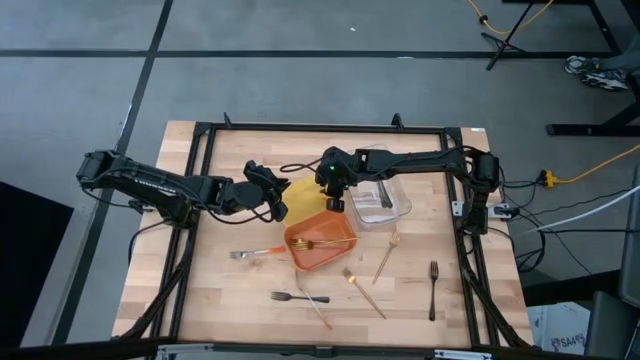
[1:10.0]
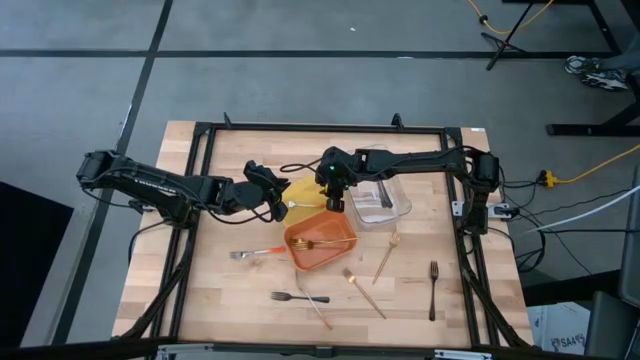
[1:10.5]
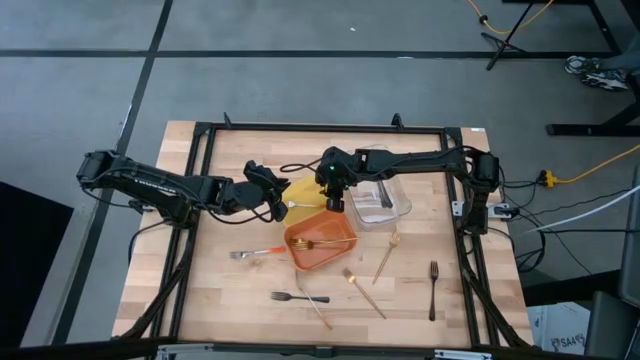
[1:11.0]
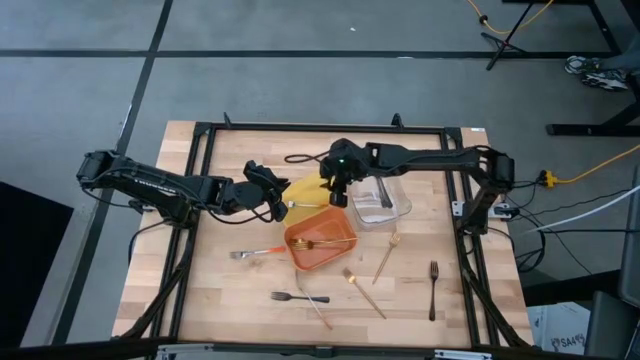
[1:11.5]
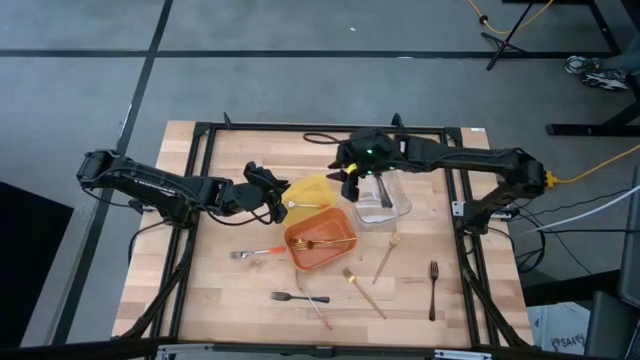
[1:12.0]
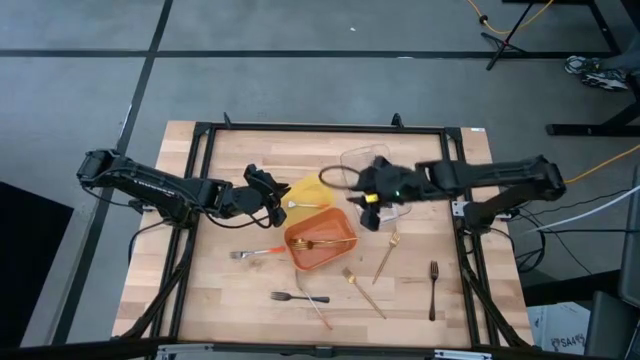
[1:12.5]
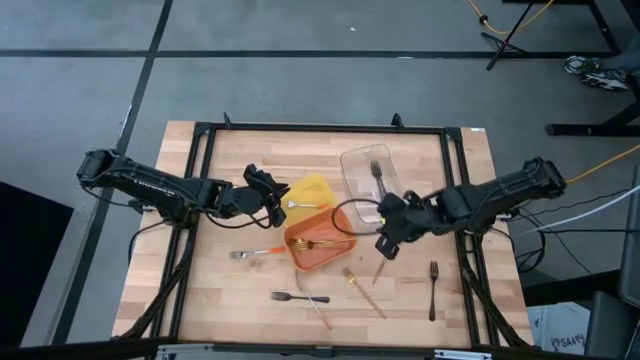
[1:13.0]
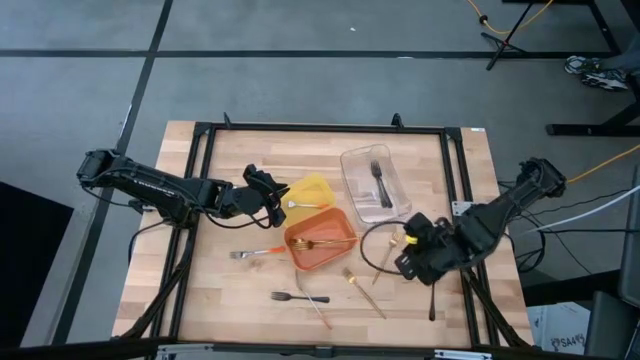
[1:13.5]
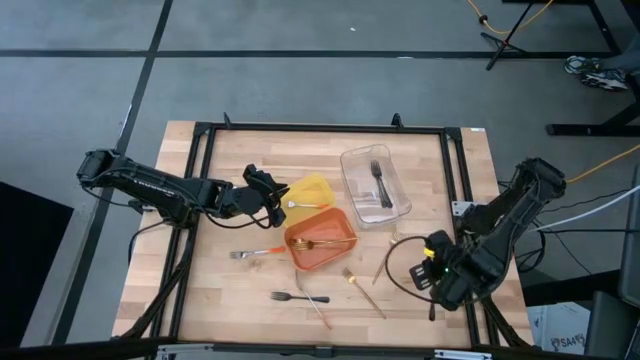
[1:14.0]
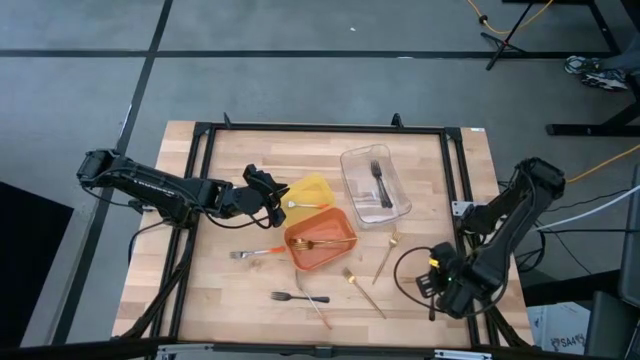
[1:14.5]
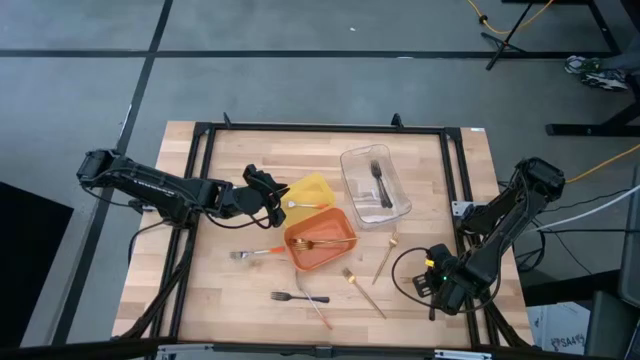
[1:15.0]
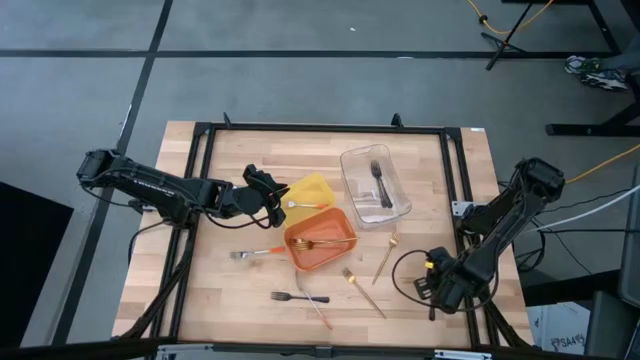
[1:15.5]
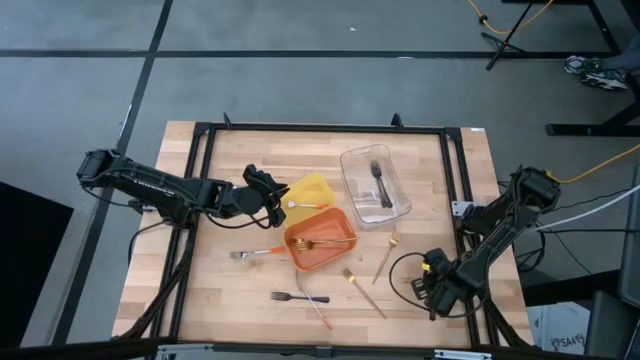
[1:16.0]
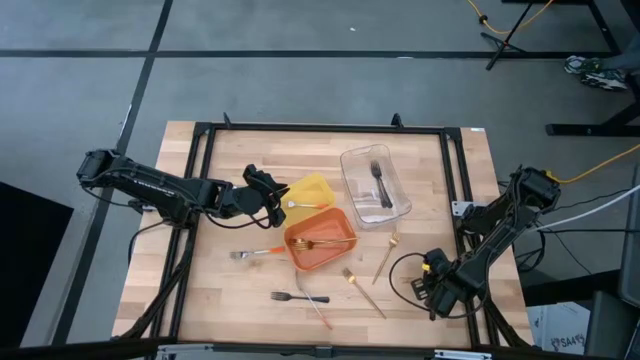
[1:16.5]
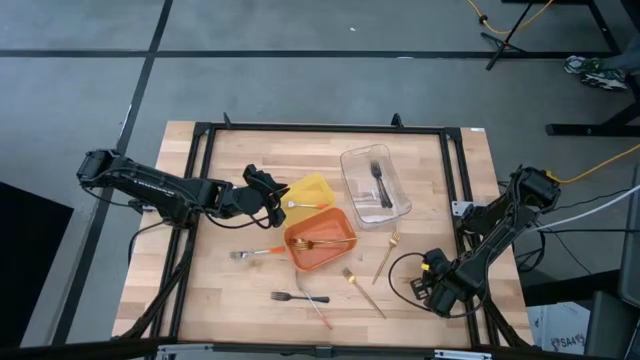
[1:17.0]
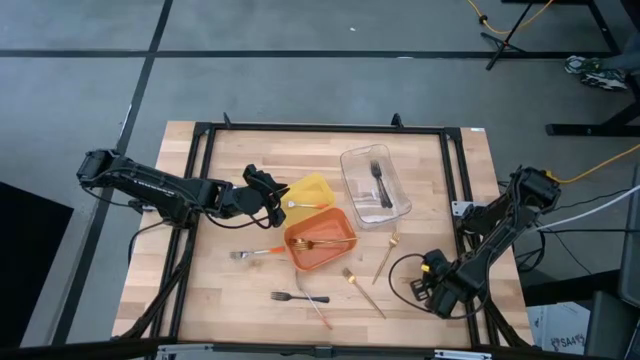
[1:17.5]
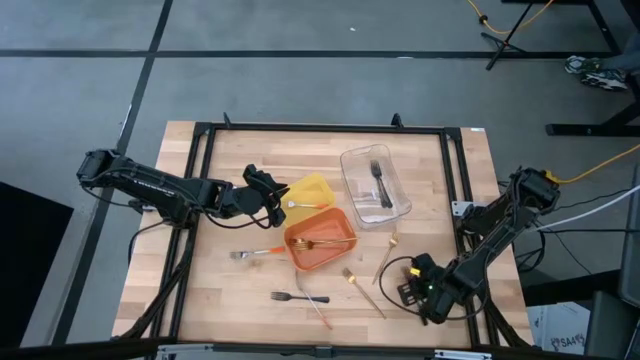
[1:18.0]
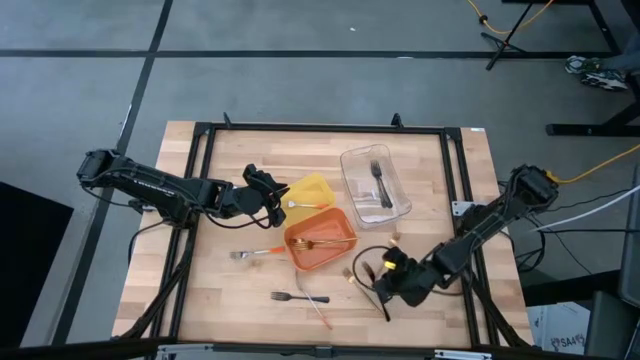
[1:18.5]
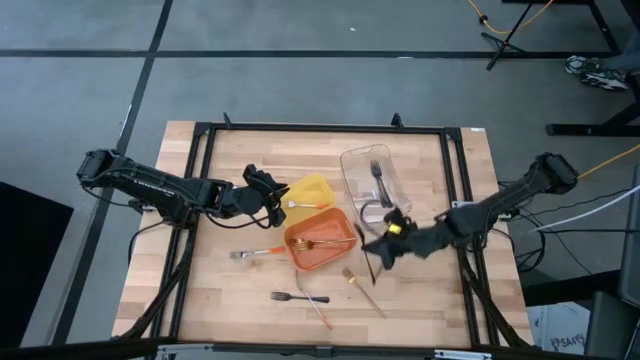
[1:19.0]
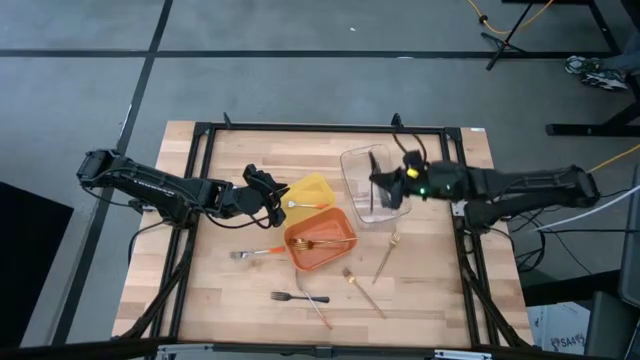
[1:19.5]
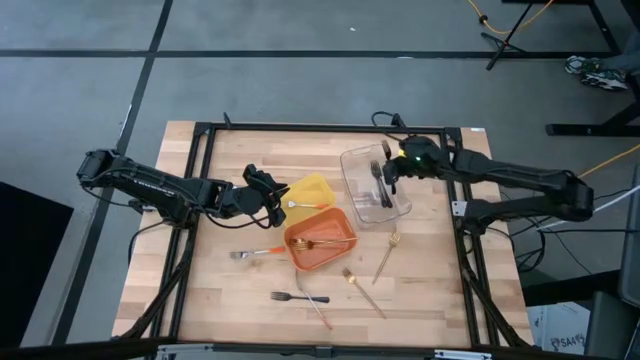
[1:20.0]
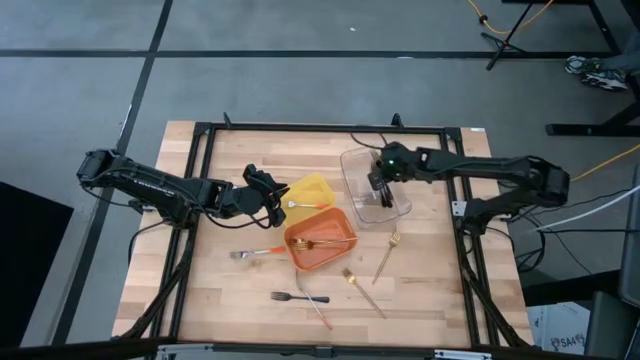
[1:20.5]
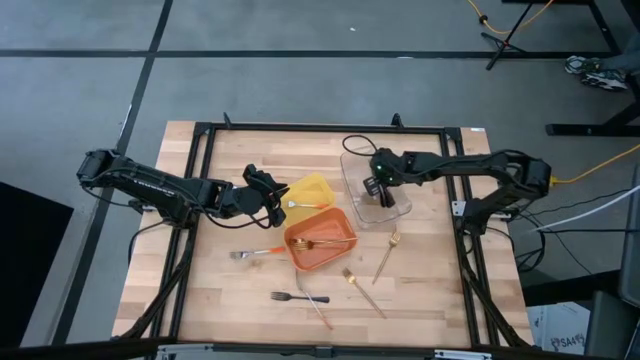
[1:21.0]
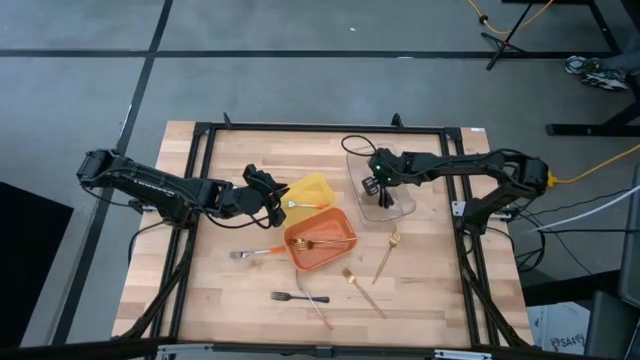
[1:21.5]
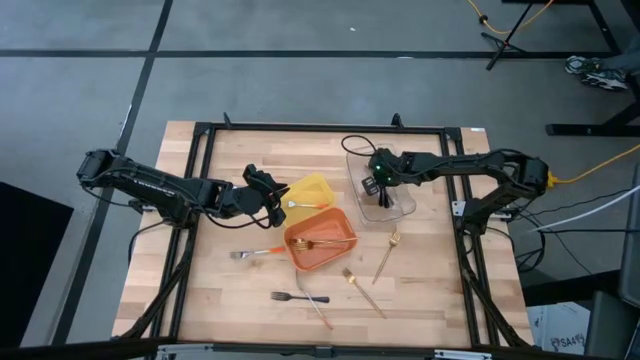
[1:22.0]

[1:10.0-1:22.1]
Task: Sort silverware by color (type)
Put the black fork into the transparent bin

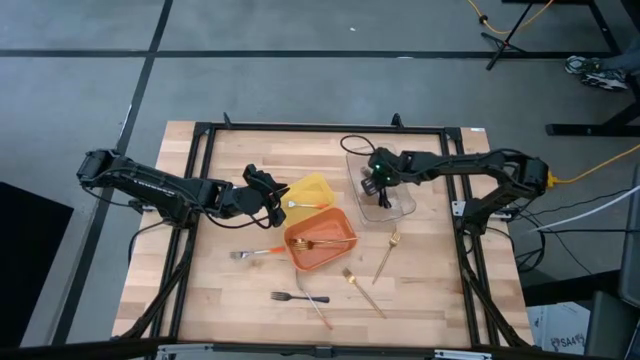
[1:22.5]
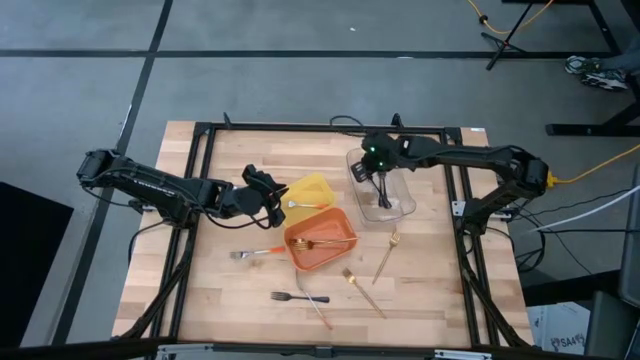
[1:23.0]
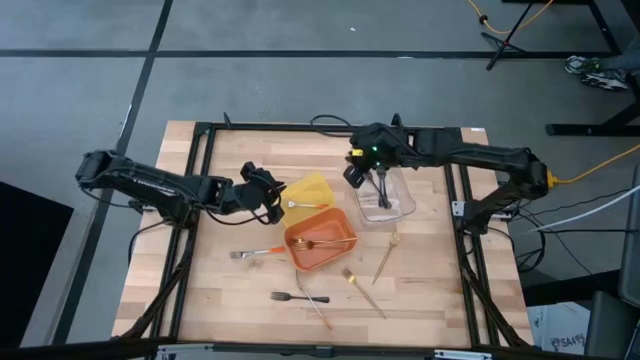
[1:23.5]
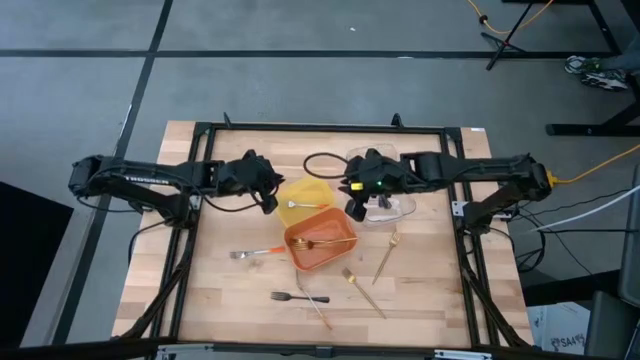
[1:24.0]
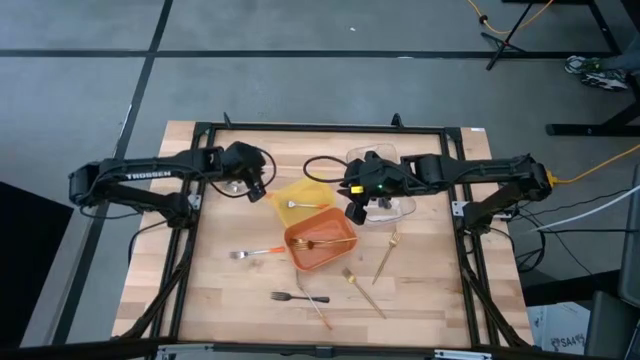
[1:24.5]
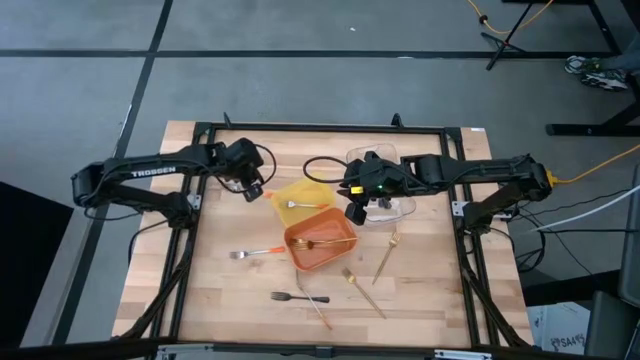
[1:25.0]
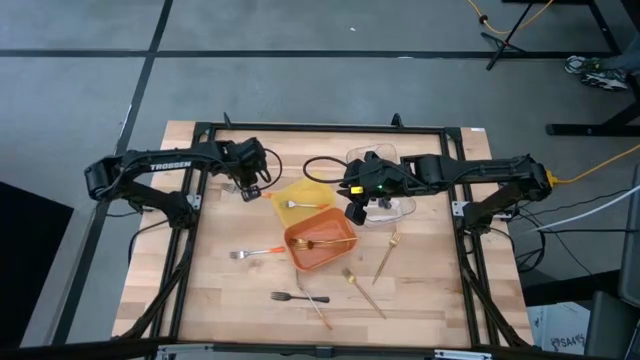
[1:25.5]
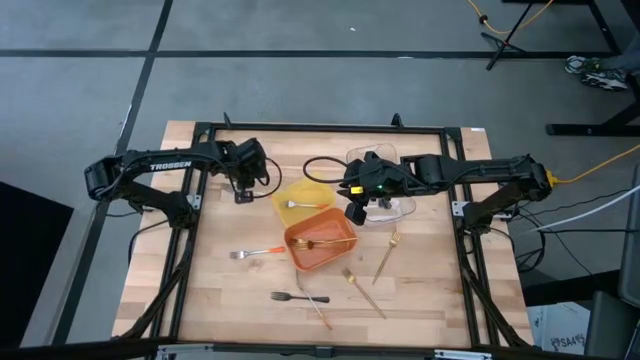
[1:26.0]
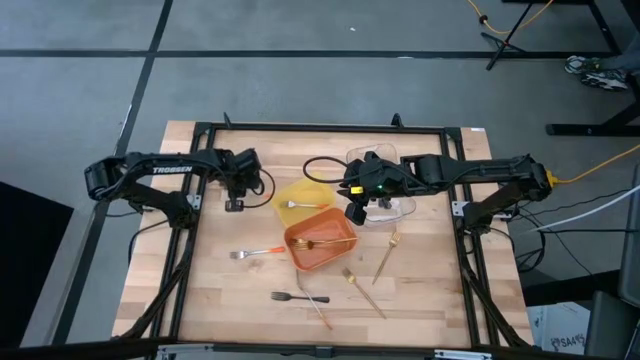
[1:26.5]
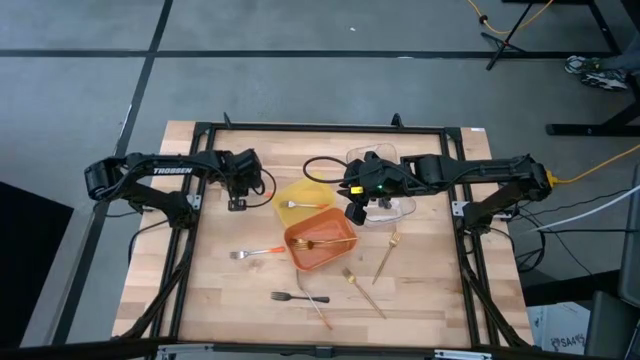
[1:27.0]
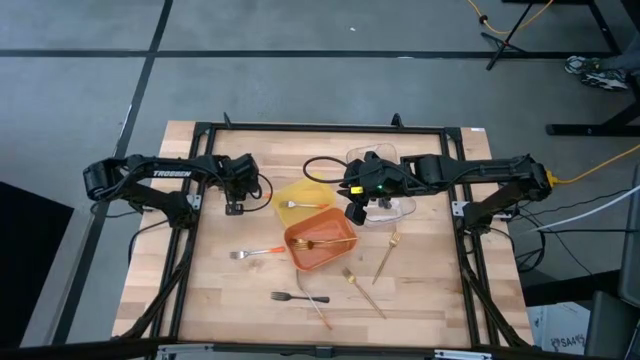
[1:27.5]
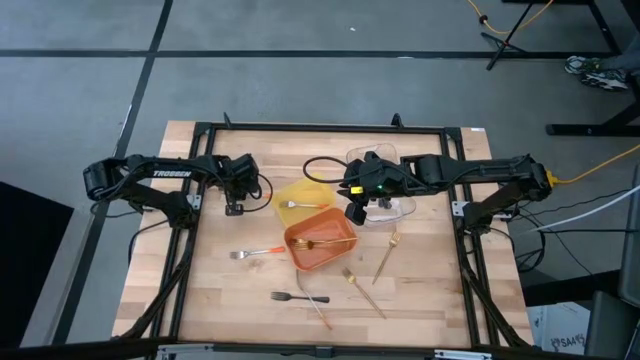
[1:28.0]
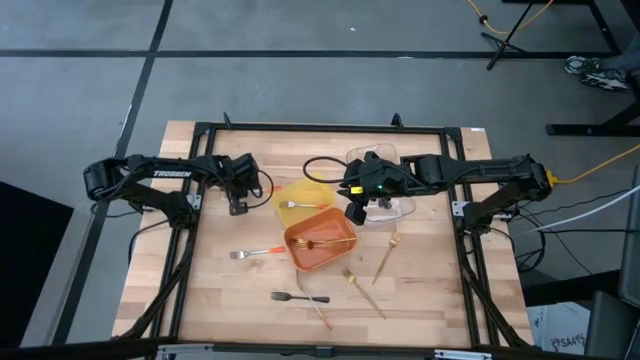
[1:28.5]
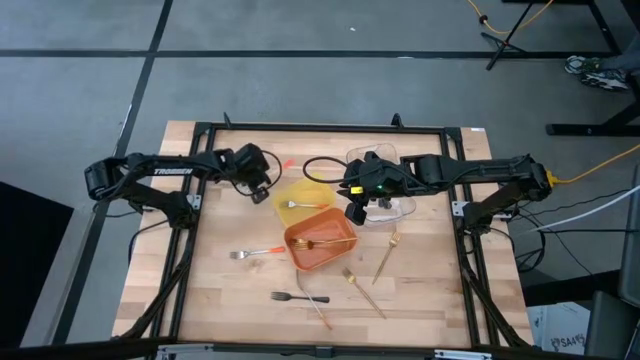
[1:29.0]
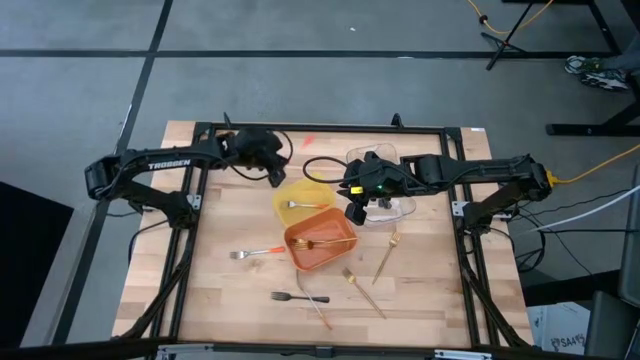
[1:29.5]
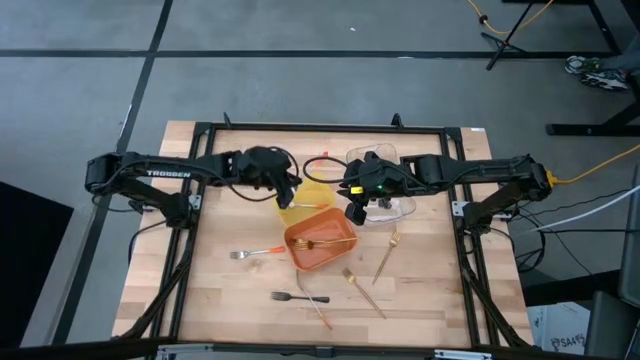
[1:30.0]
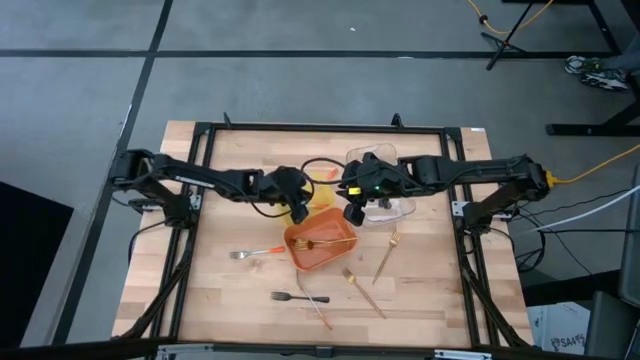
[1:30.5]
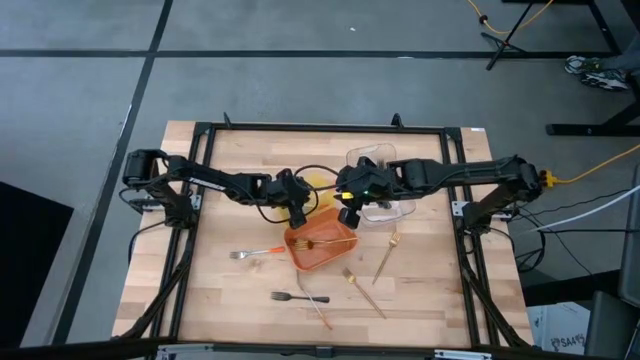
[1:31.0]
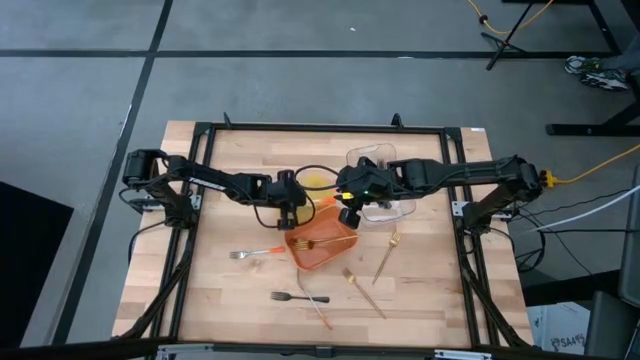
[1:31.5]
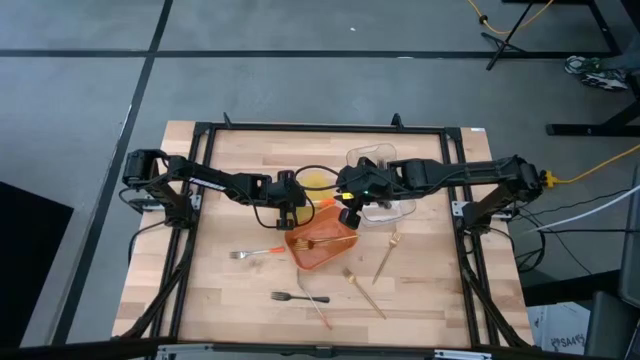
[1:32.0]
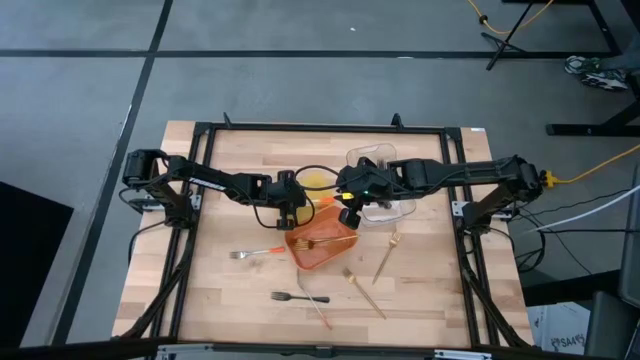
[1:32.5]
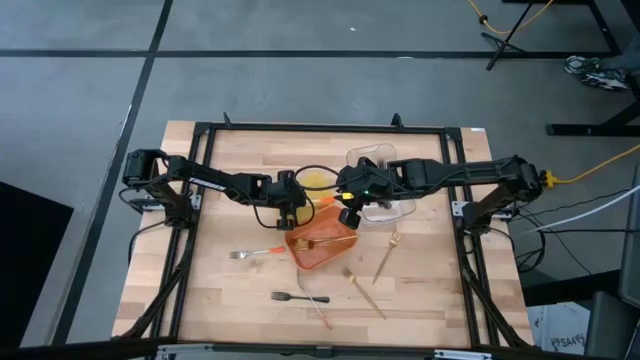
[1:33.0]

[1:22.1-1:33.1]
Put the orange fork into the yellow bin
